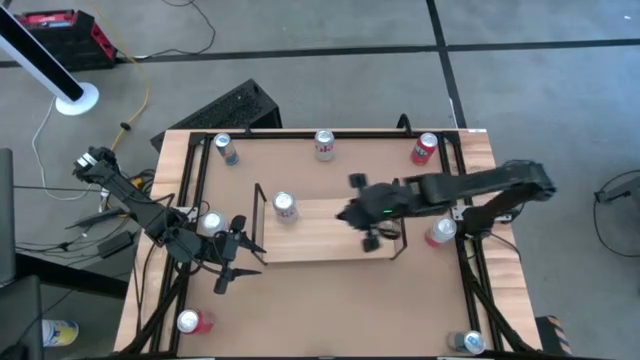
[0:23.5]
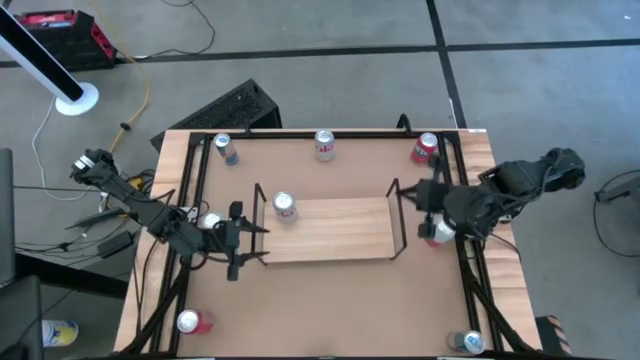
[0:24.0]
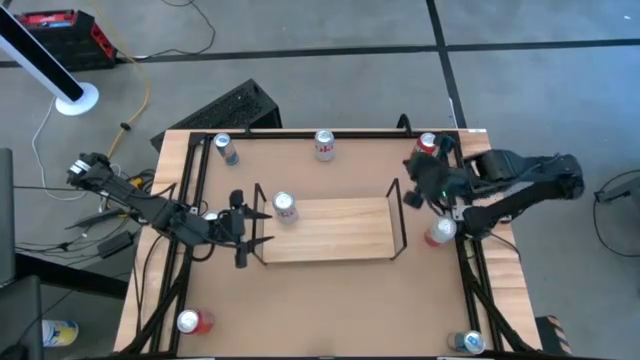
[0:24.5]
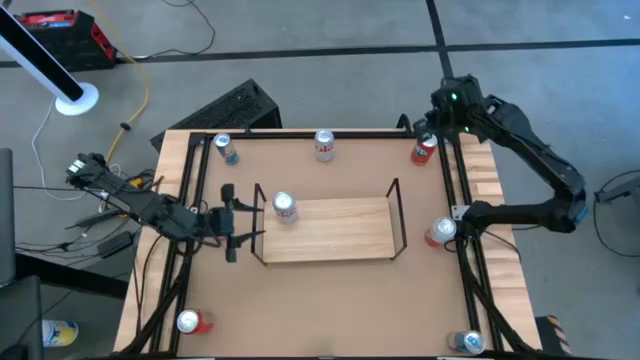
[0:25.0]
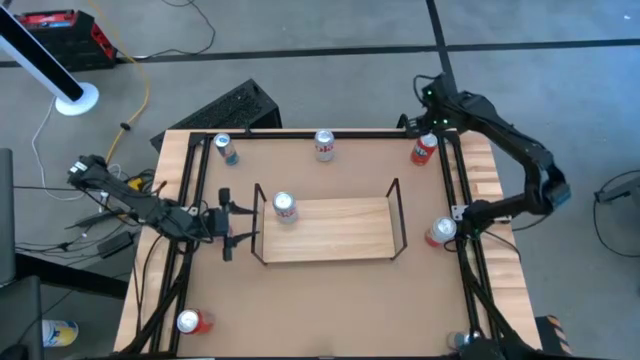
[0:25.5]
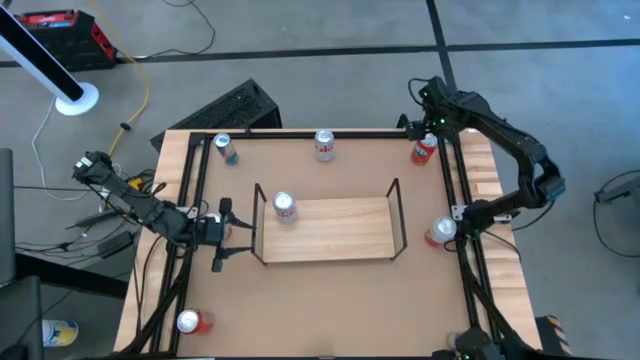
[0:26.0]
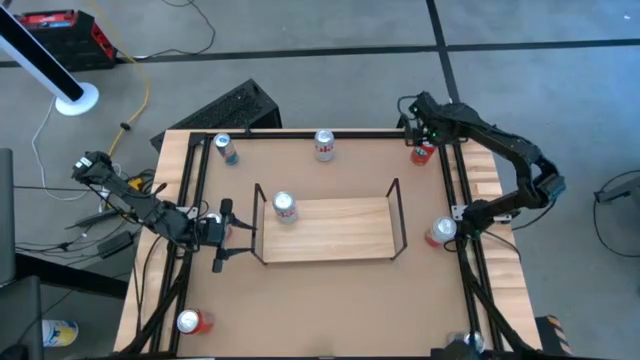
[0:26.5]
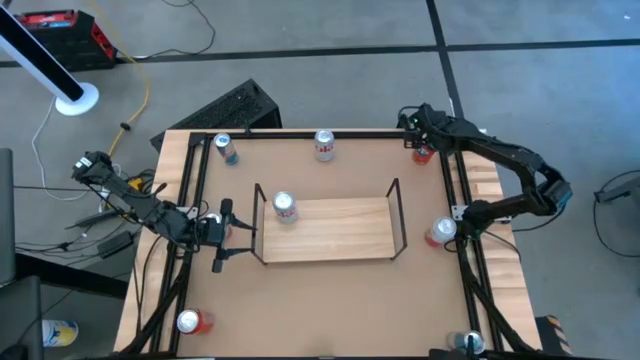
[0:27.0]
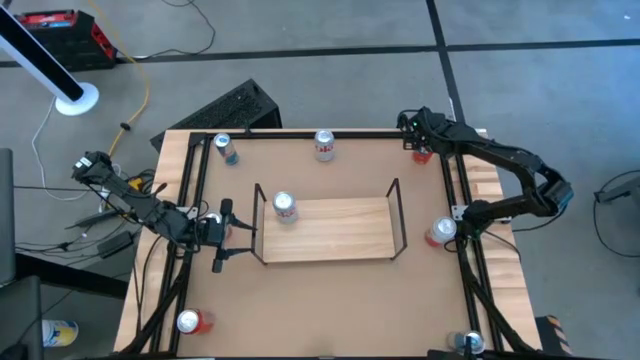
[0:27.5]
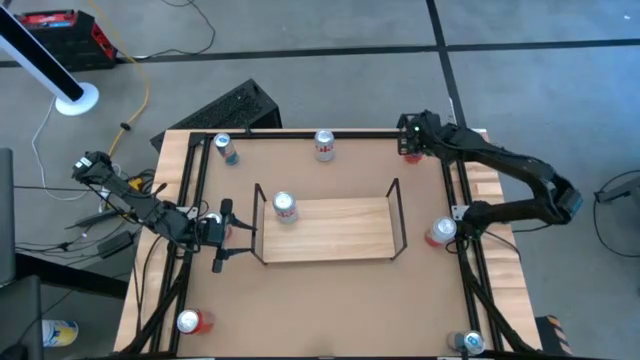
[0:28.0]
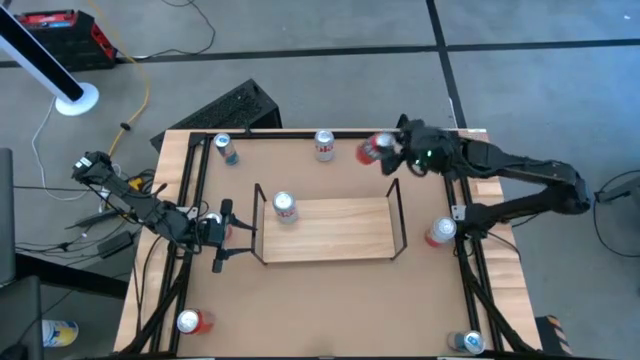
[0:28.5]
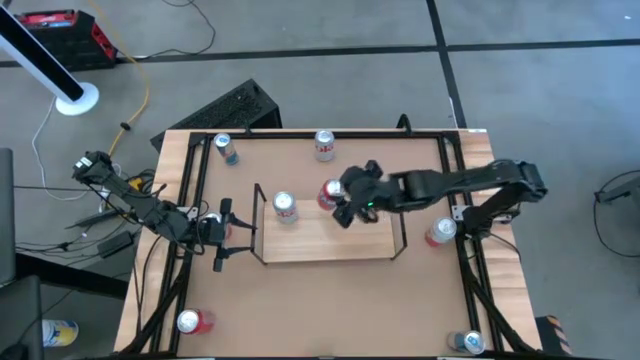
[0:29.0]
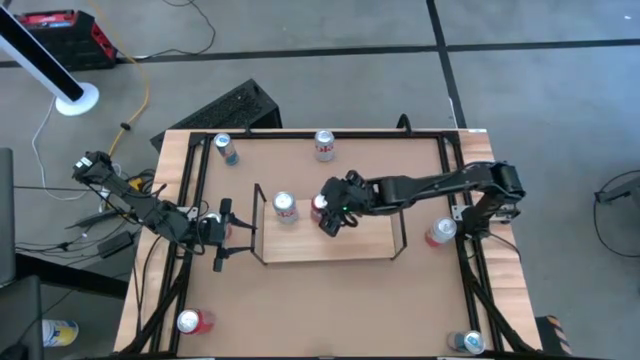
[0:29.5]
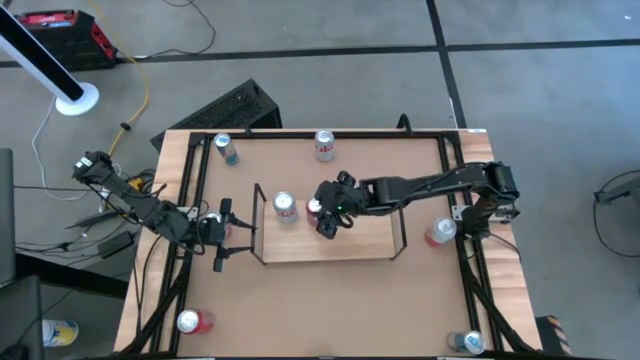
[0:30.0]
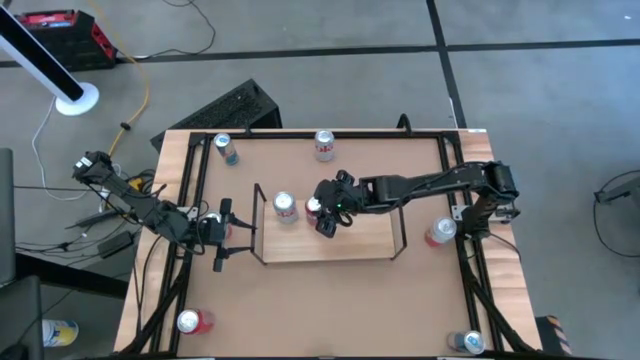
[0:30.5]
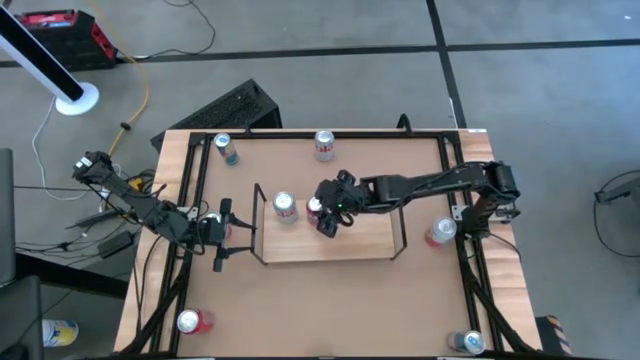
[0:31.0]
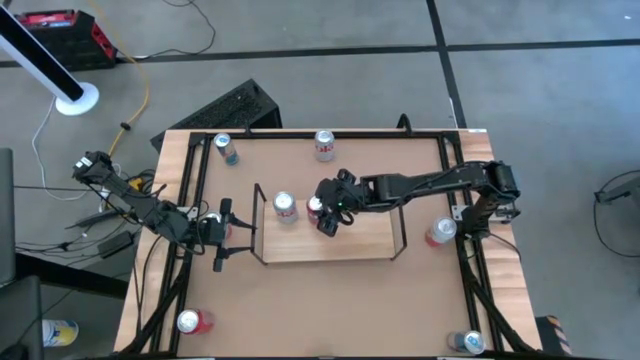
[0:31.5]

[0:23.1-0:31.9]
Task: Place canned beverage on shelf
Put the top orange soda can on the shelf aligned with the other silver soda can

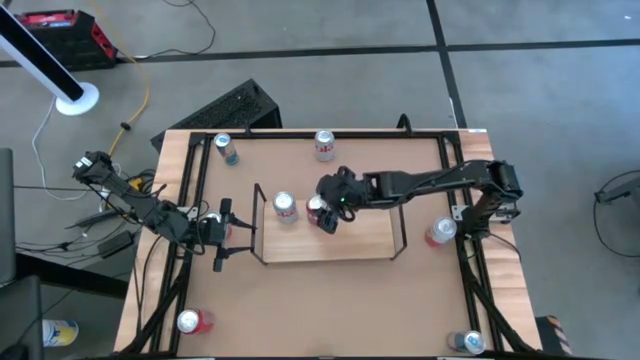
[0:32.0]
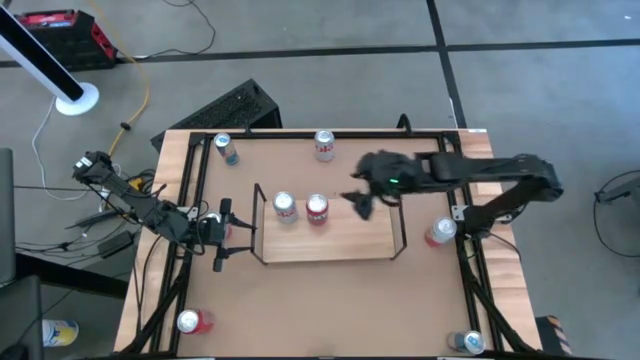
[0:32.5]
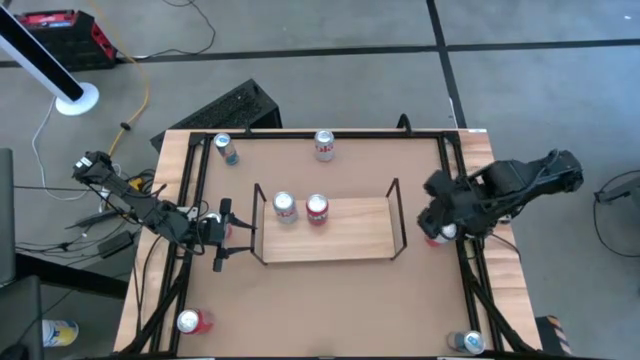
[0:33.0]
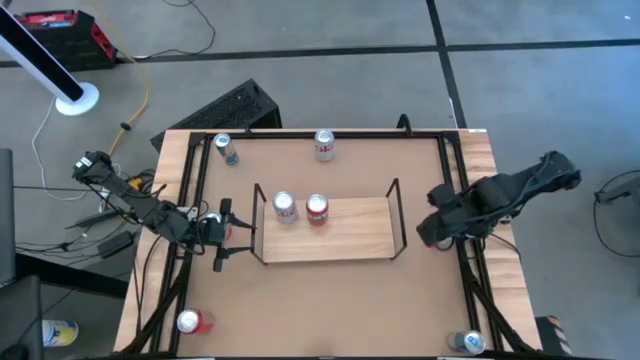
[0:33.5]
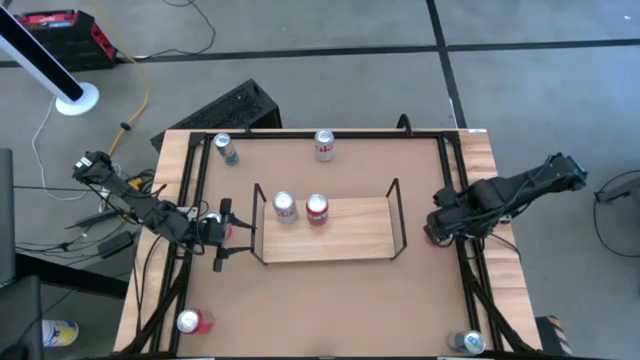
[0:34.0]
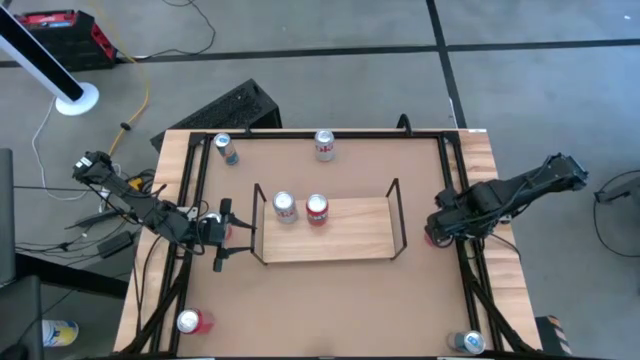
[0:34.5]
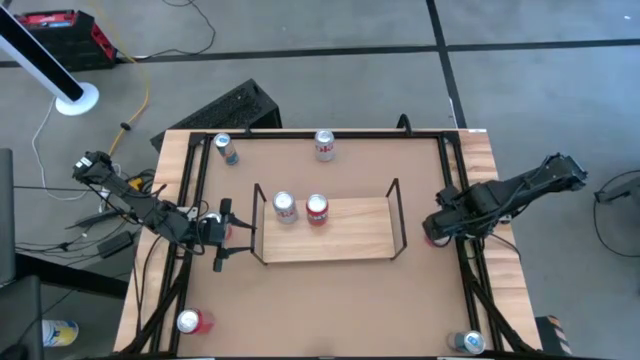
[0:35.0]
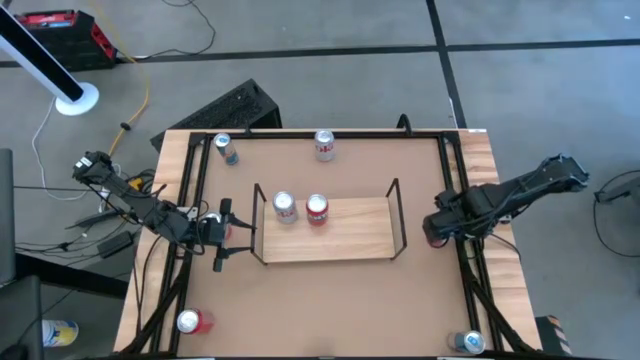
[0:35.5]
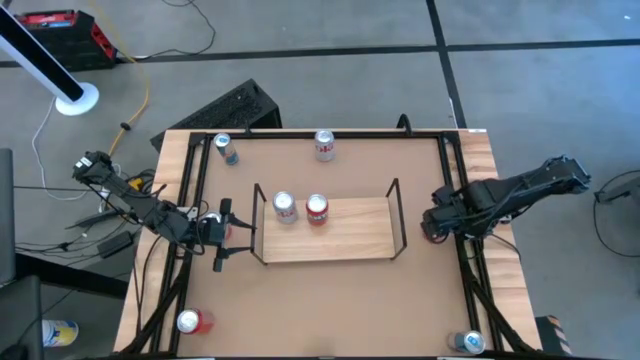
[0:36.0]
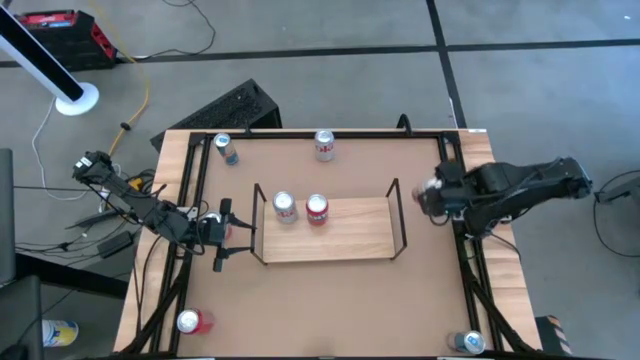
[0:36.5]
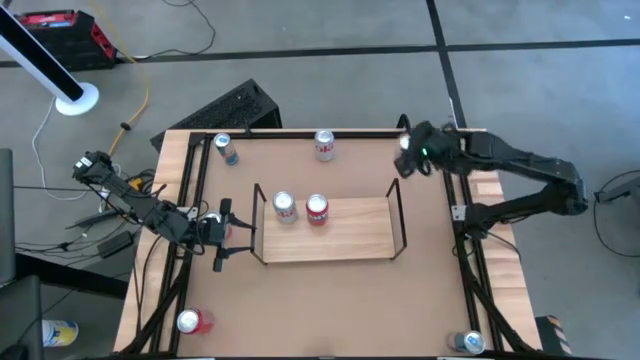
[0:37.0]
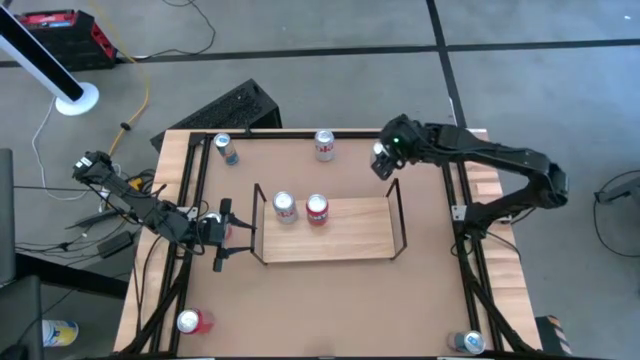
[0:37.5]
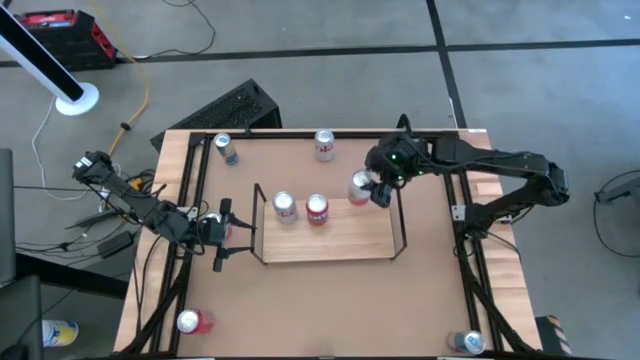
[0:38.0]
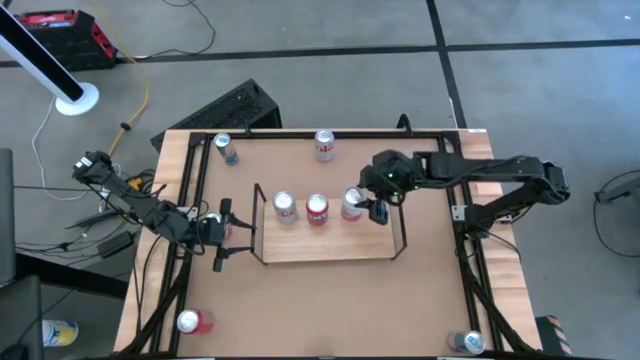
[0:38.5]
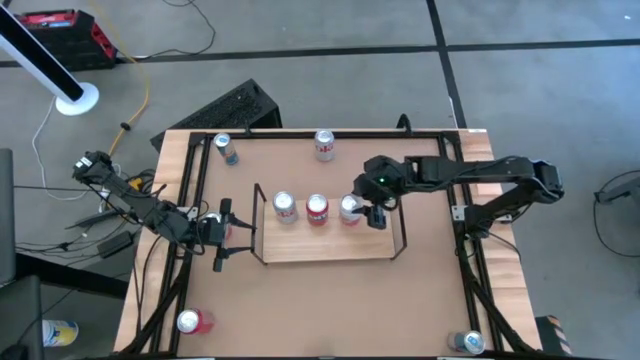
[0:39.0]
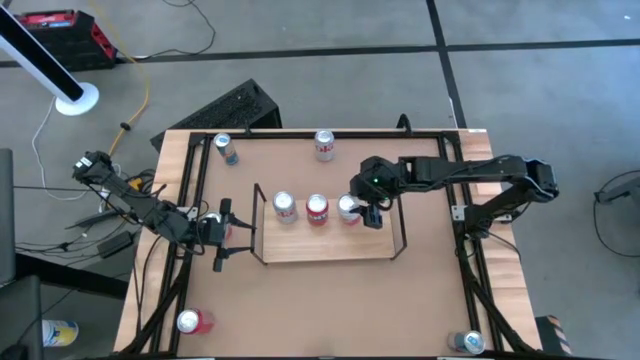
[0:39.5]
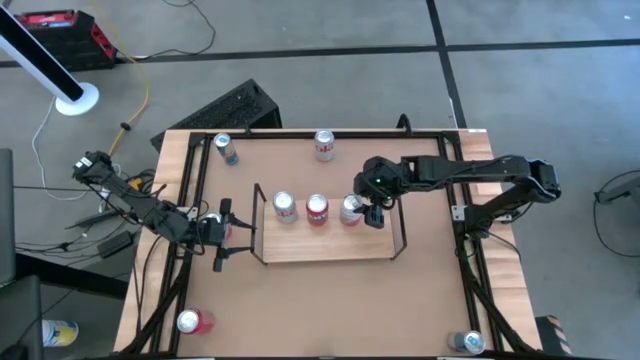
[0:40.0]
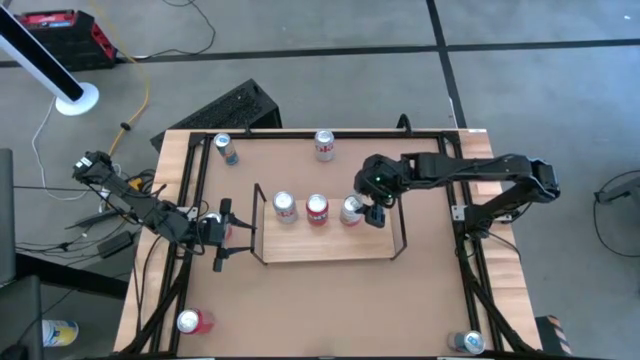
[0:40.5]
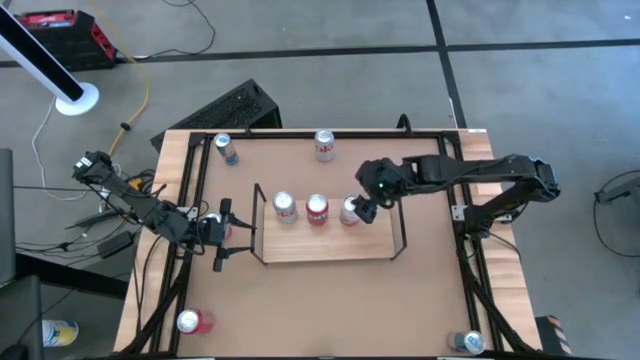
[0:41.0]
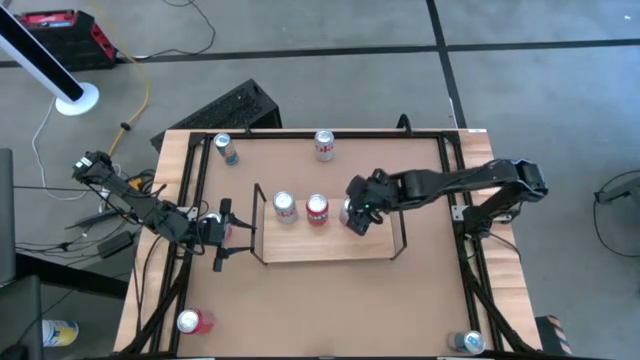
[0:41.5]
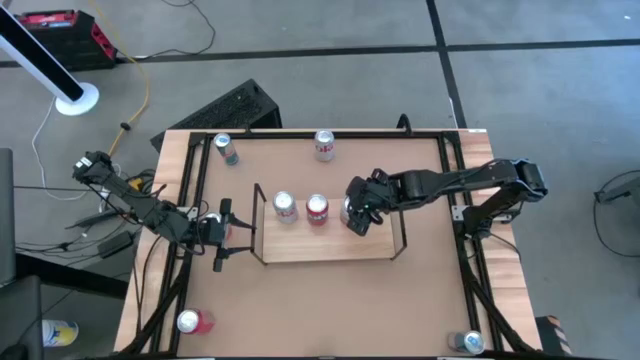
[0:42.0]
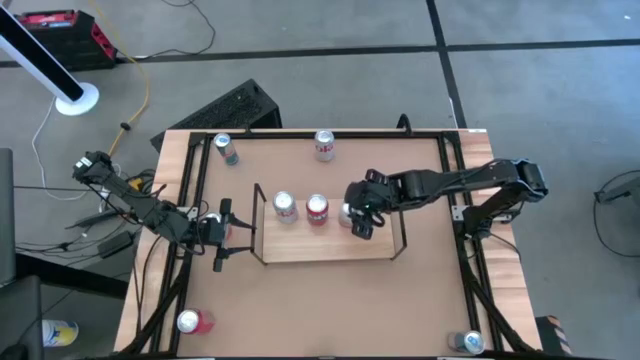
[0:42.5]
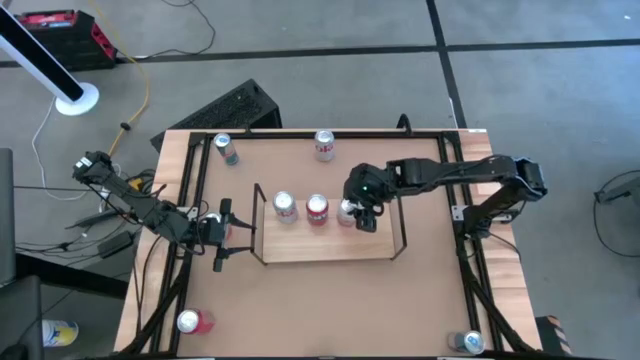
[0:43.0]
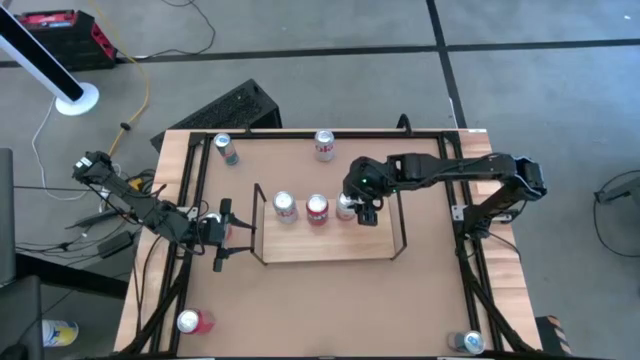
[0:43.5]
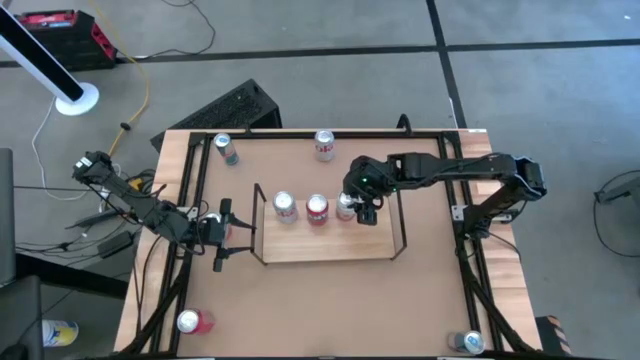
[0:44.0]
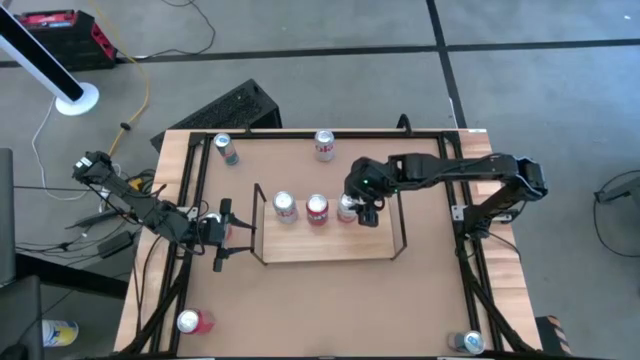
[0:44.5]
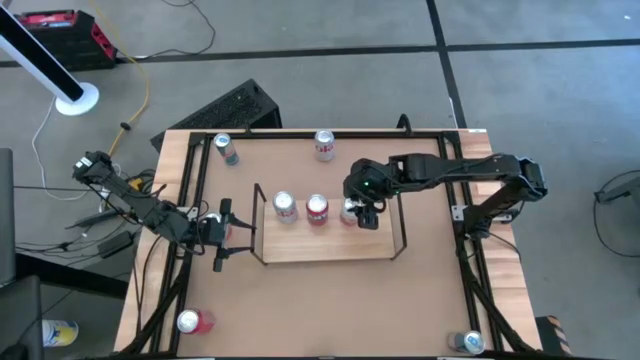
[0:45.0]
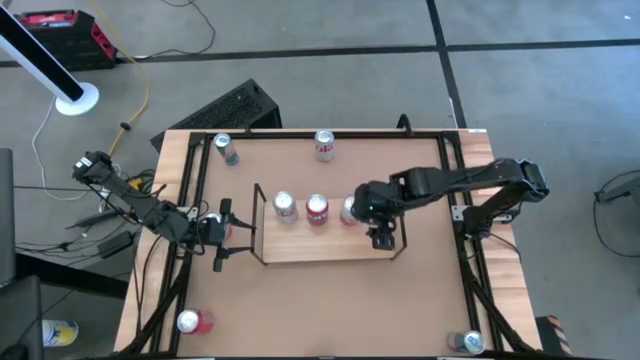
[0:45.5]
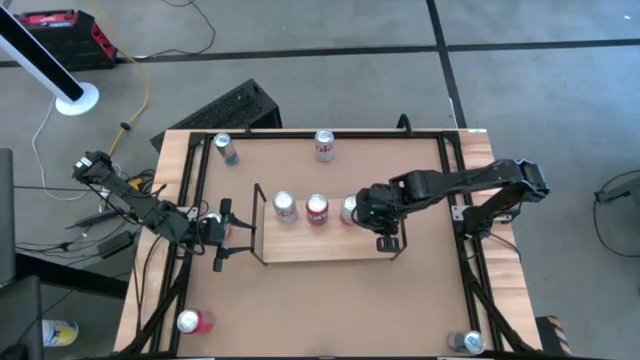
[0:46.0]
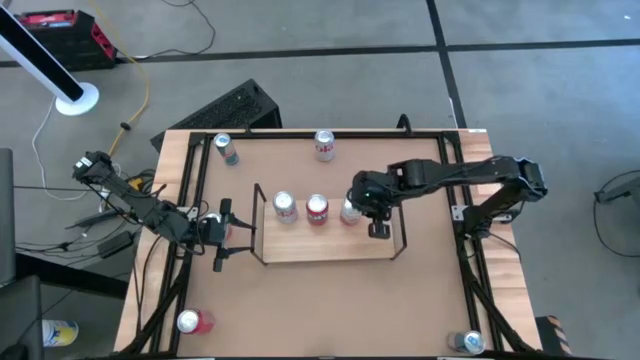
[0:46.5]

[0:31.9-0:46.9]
Put the right pink soda can on the shelf aligned with the other orange soda can
